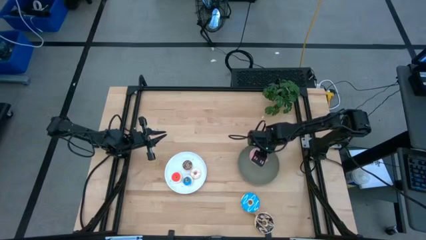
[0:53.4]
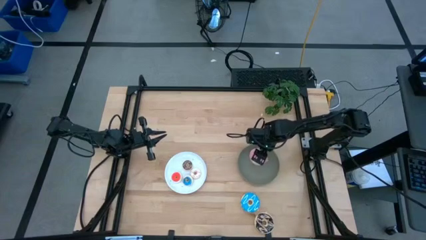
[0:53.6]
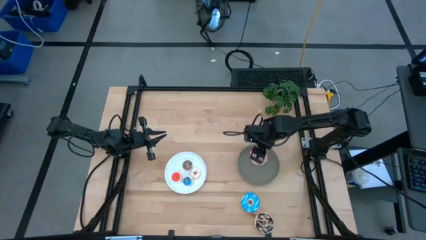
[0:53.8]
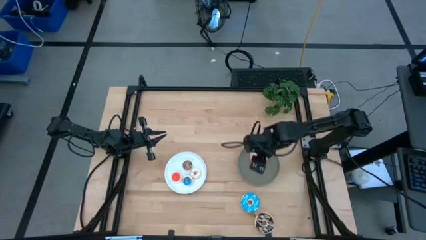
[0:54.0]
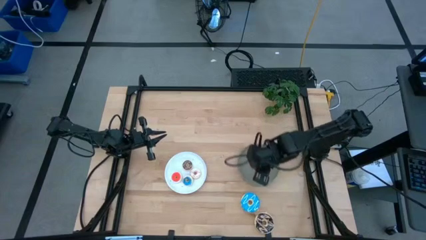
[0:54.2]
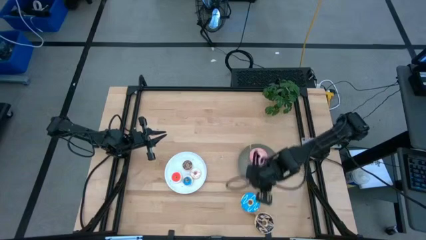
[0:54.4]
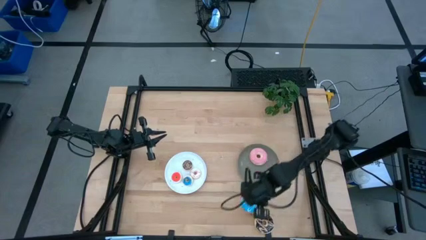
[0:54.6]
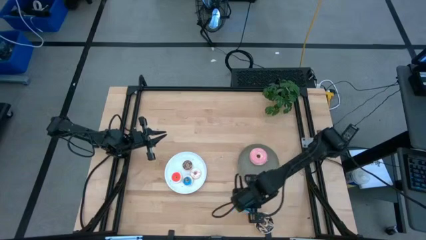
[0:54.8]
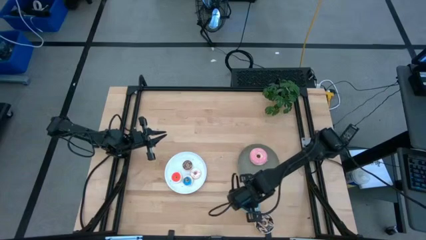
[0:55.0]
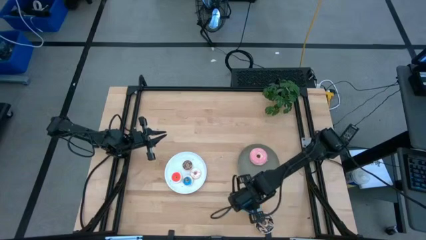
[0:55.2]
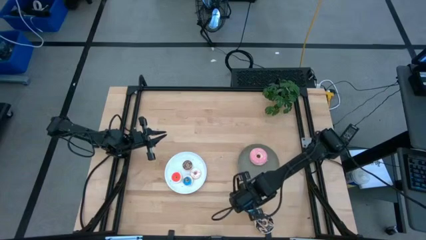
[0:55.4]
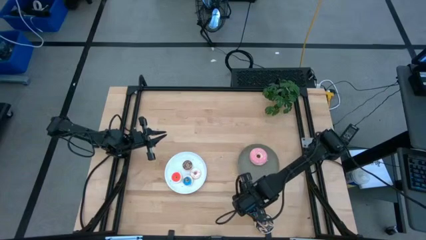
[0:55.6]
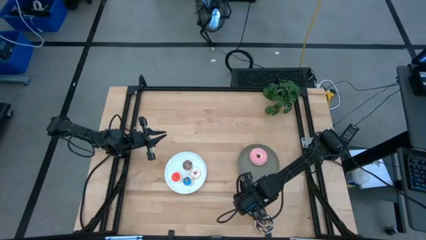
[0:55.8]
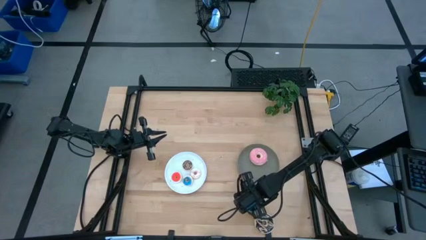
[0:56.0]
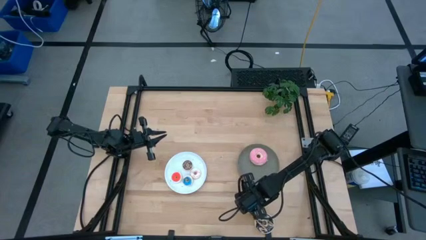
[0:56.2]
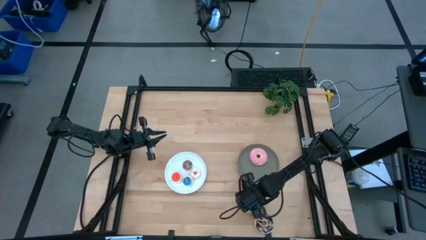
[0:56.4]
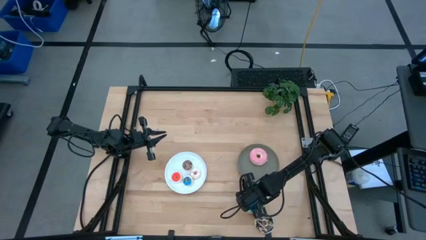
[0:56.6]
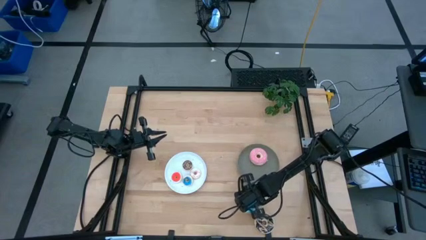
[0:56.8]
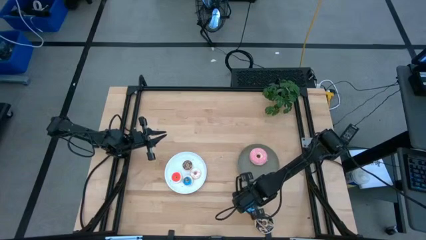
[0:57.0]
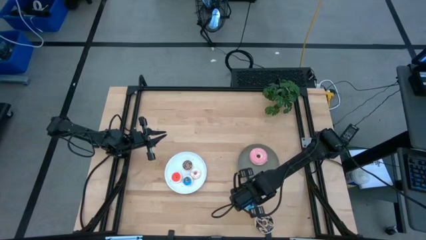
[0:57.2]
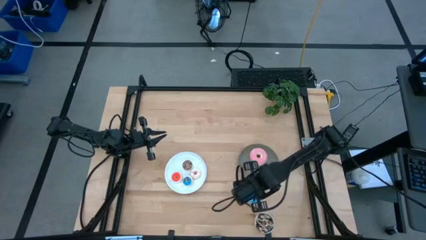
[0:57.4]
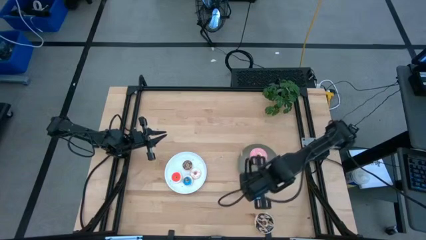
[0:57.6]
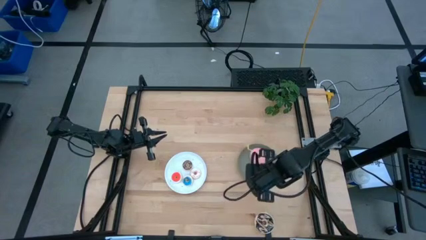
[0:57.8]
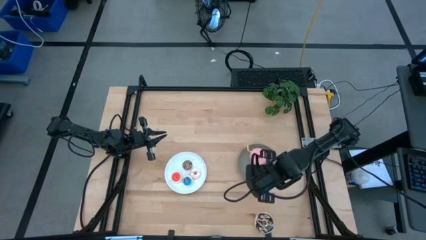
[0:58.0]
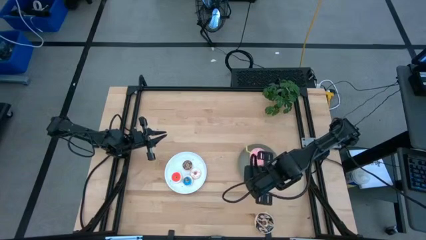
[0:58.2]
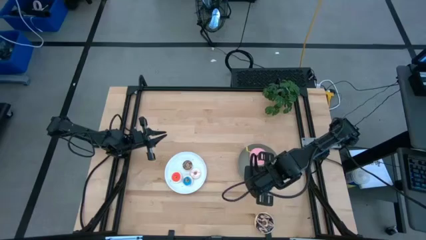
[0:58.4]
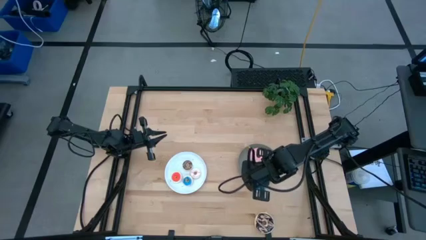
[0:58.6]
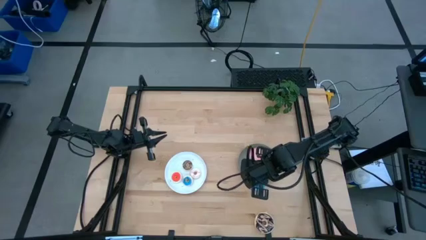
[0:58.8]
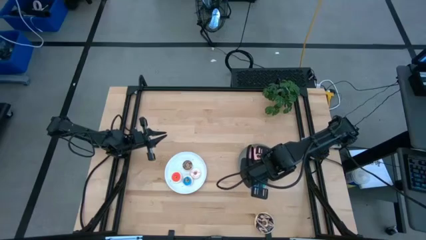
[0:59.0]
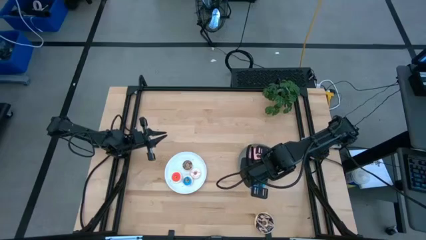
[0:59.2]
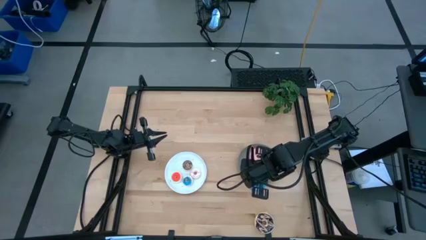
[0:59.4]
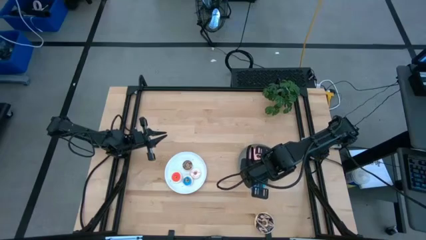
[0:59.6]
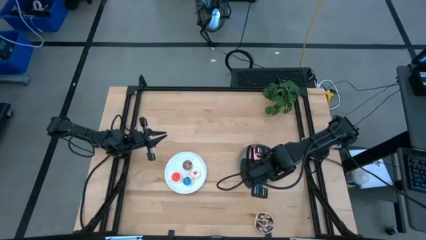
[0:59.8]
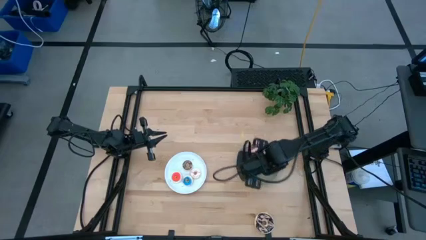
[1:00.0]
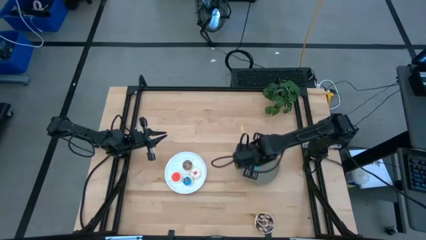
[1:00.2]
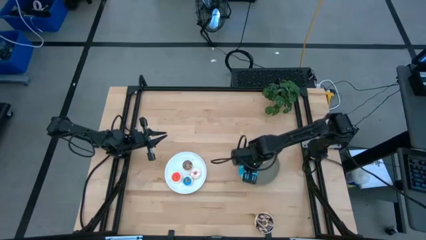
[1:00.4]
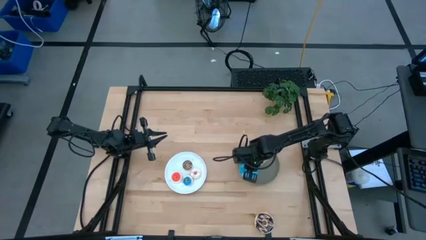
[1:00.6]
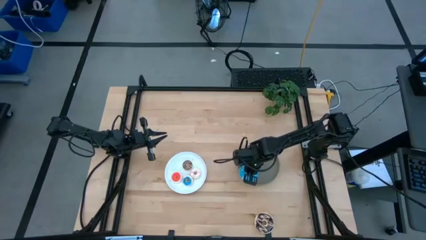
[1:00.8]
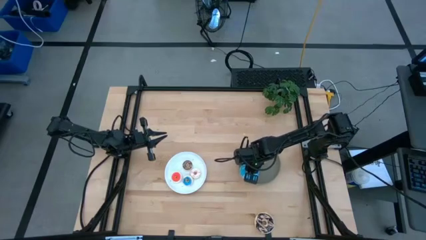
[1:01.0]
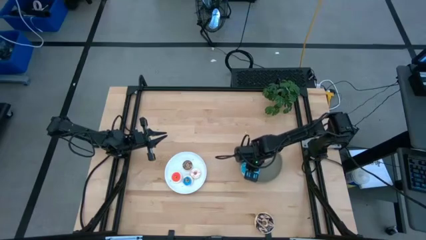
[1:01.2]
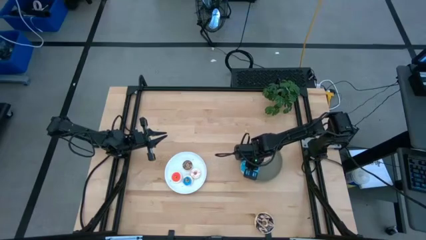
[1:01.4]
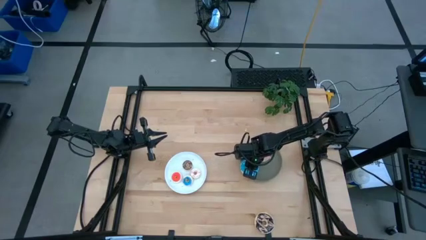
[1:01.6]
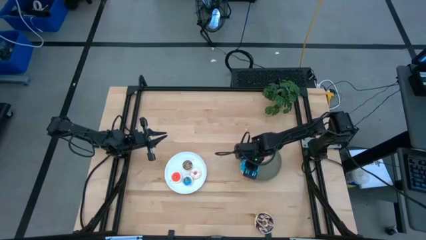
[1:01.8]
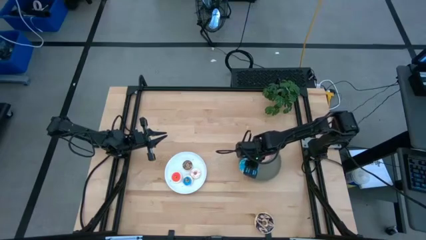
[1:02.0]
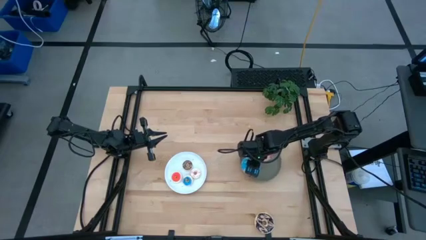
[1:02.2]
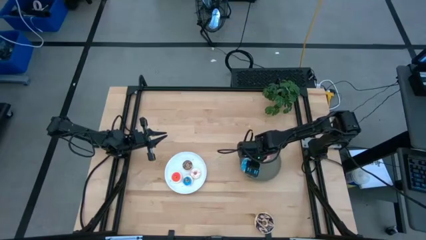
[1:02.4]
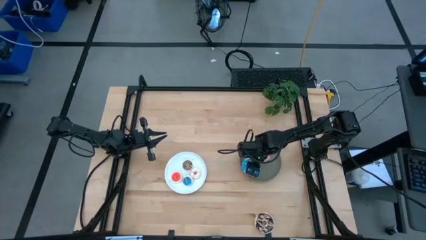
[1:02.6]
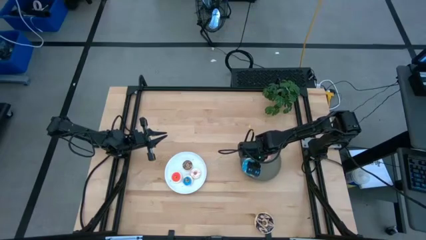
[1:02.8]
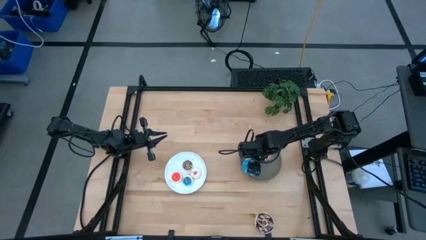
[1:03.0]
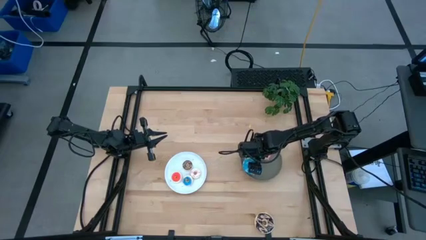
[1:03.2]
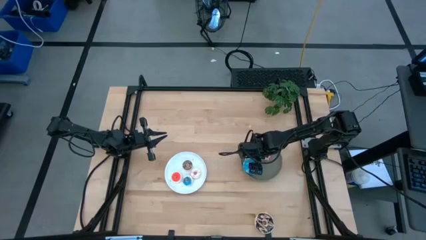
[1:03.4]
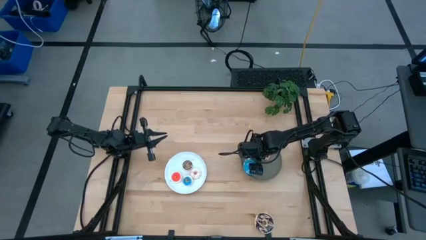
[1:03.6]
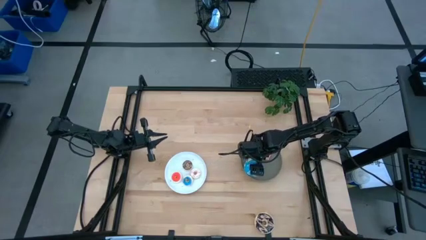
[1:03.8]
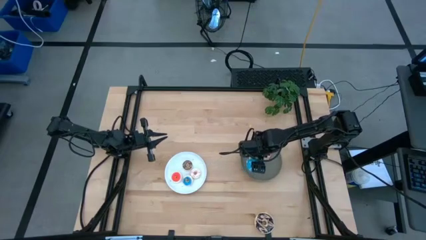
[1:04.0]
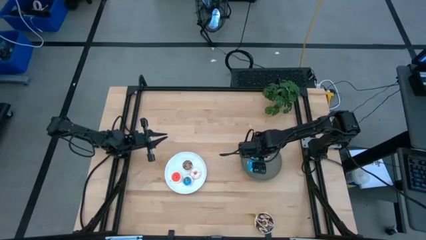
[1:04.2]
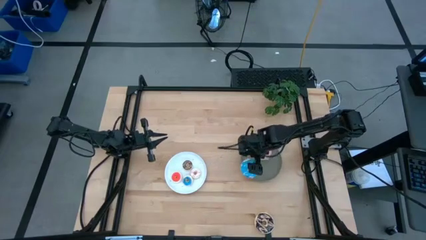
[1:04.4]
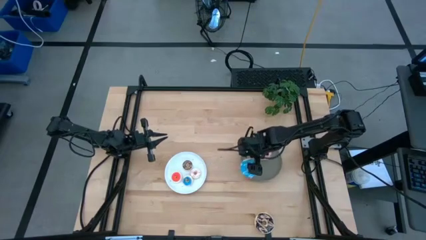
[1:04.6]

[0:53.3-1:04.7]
Task: Pick & Place donuts
Put the big blue donut on the gray plate

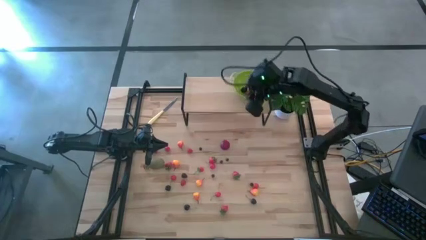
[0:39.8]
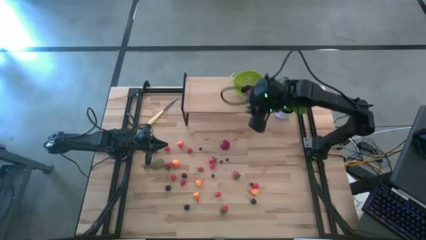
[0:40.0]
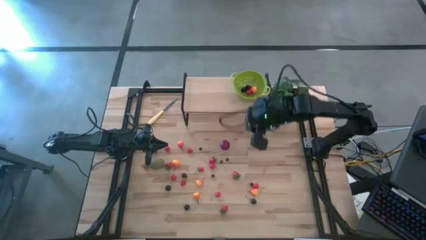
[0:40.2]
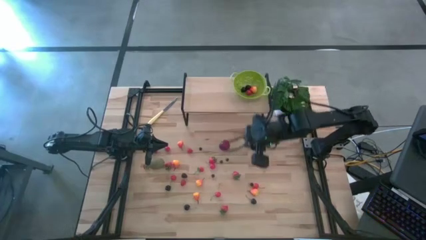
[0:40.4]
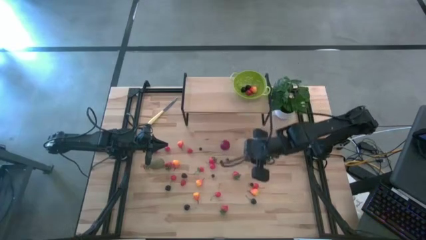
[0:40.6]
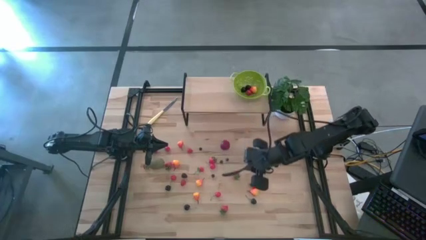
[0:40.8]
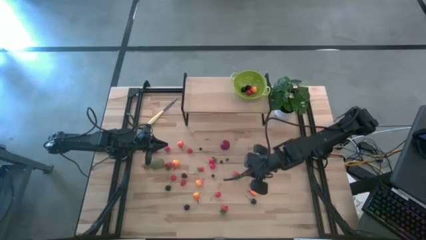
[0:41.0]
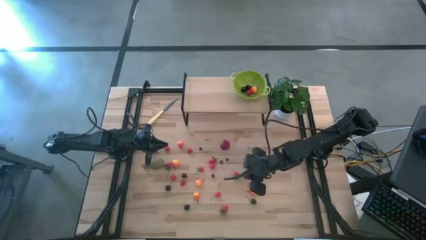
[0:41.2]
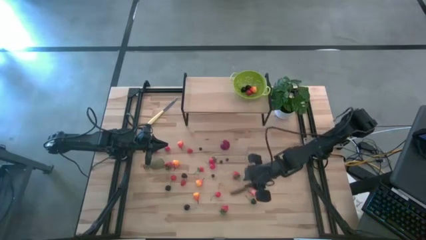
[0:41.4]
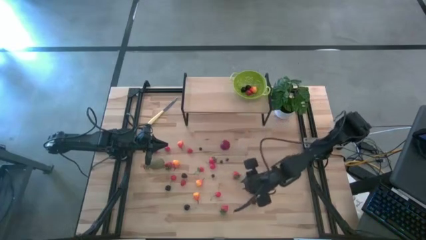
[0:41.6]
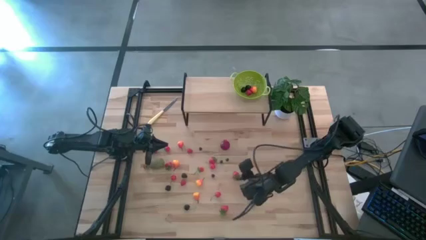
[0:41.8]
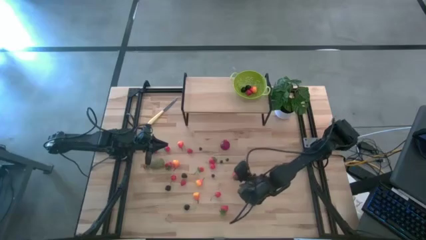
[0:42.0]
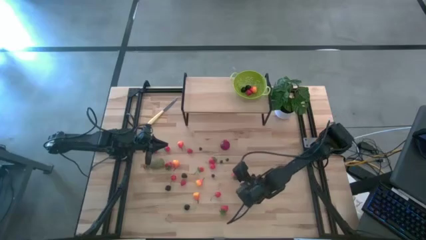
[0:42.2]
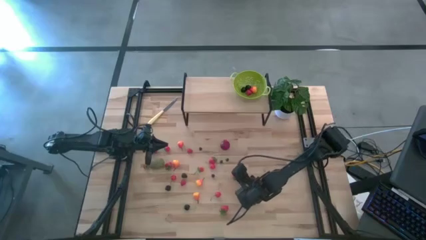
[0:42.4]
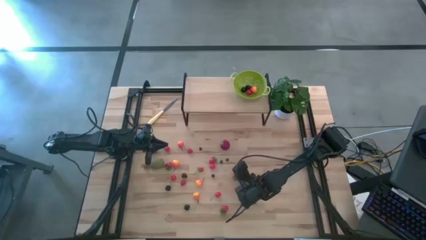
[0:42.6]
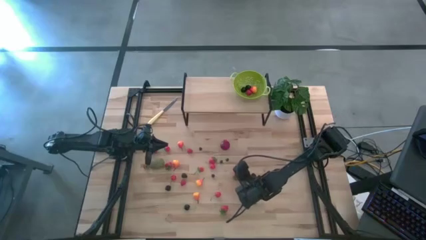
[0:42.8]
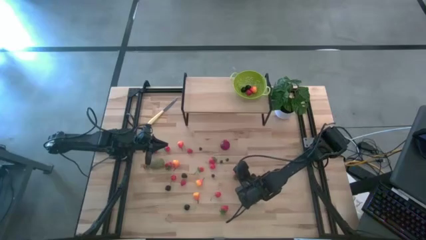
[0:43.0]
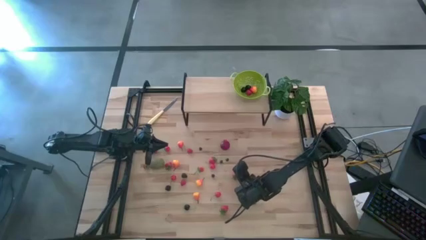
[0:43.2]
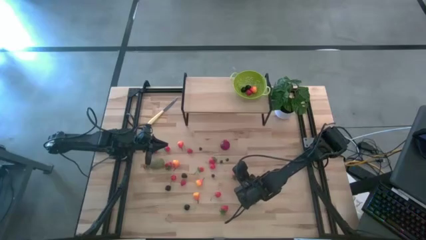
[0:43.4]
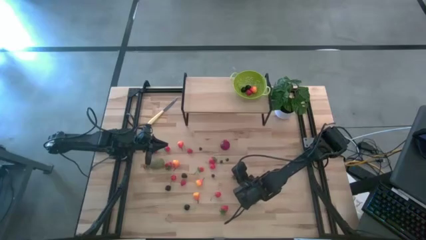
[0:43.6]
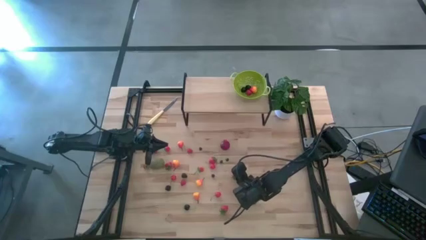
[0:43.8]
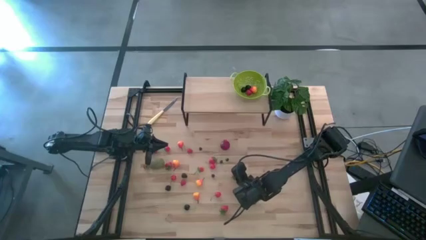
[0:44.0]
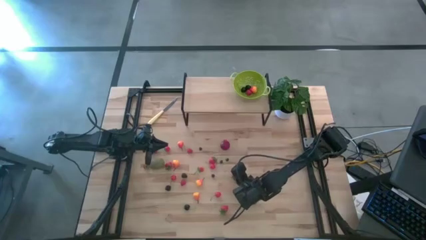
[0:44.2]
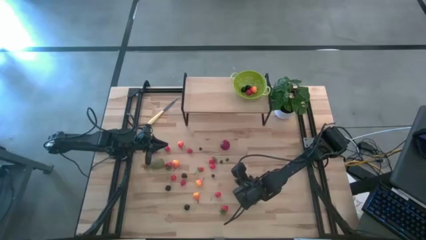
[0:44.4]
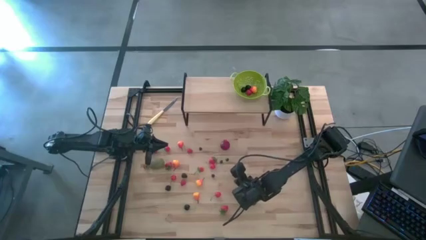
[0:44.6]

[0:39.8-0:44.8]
Task: Build produce basket
Put the strawberry into the green basket
